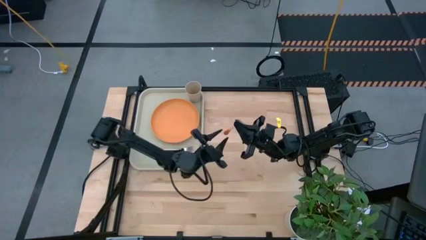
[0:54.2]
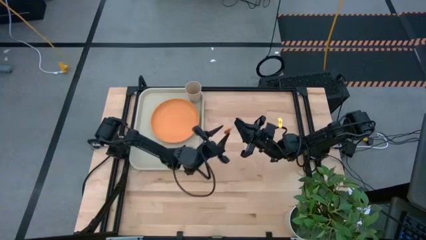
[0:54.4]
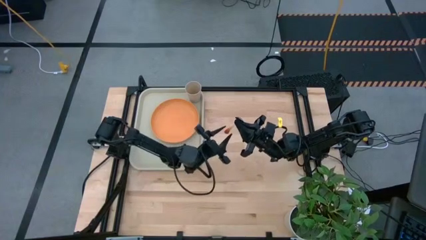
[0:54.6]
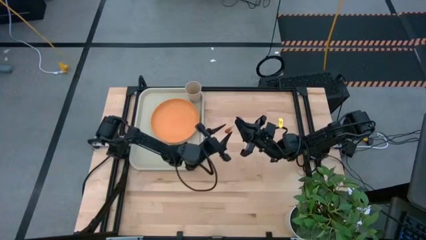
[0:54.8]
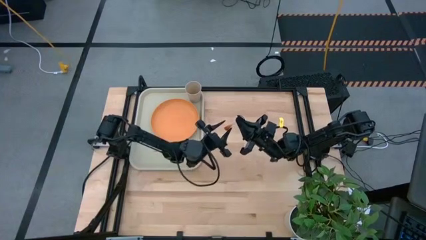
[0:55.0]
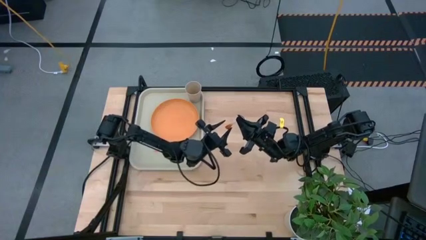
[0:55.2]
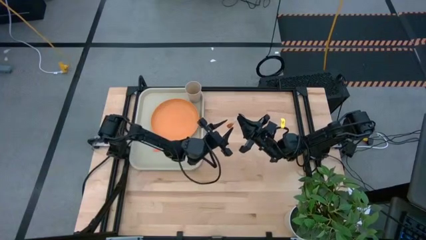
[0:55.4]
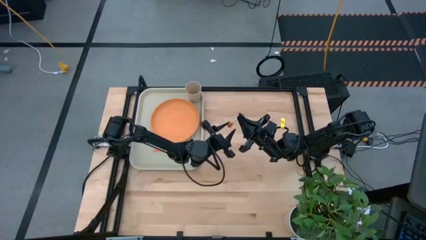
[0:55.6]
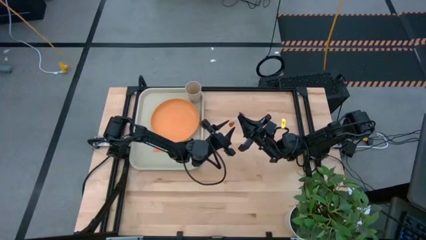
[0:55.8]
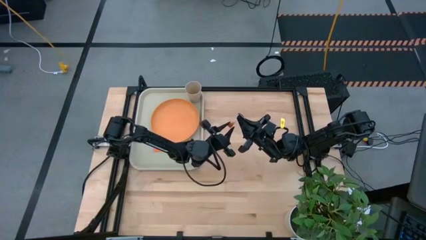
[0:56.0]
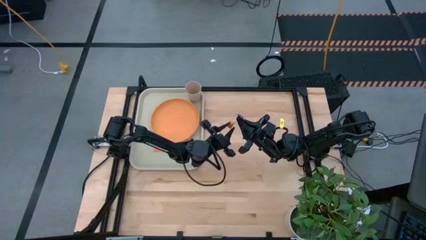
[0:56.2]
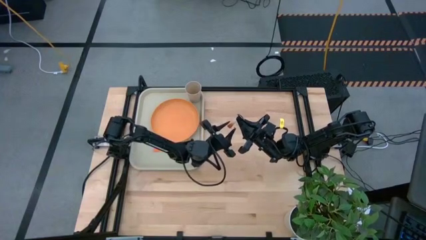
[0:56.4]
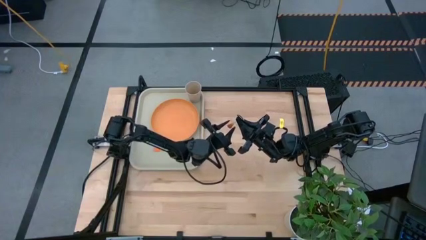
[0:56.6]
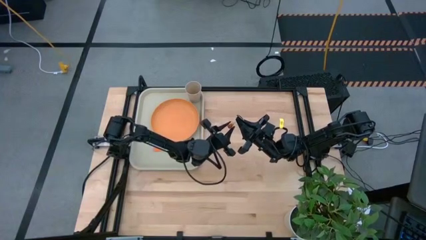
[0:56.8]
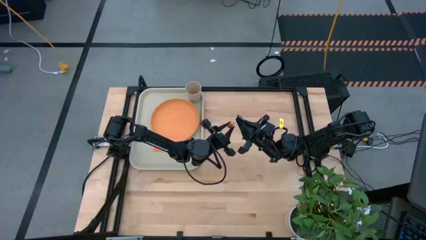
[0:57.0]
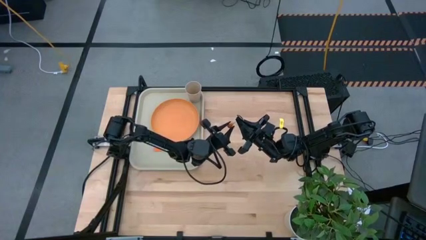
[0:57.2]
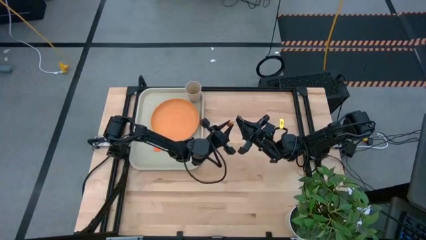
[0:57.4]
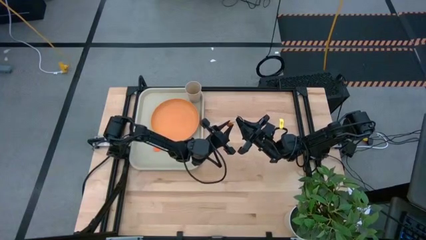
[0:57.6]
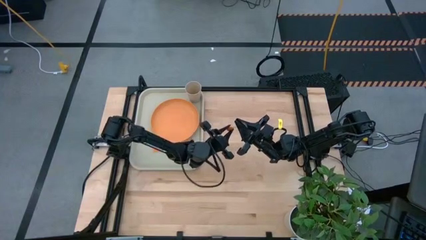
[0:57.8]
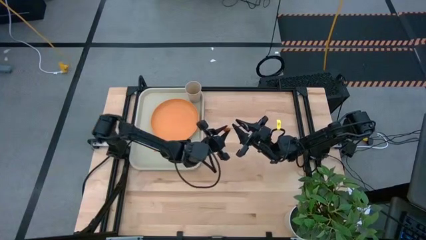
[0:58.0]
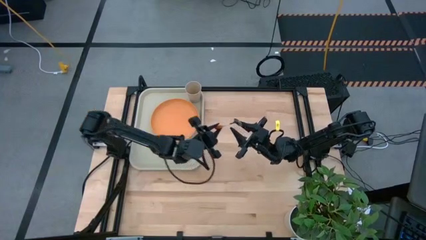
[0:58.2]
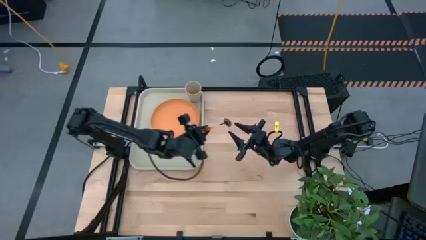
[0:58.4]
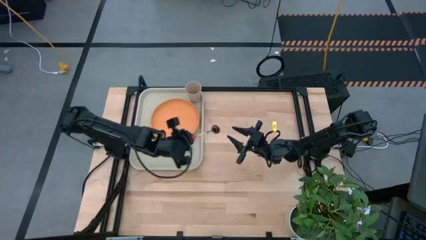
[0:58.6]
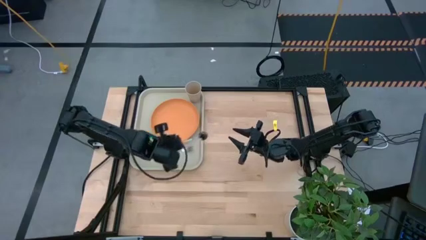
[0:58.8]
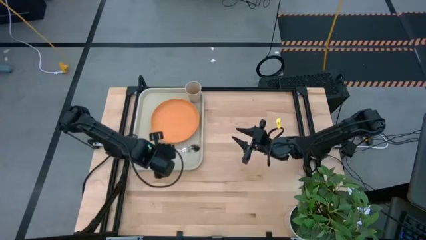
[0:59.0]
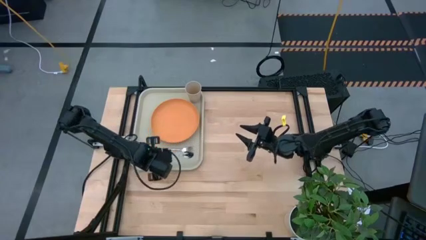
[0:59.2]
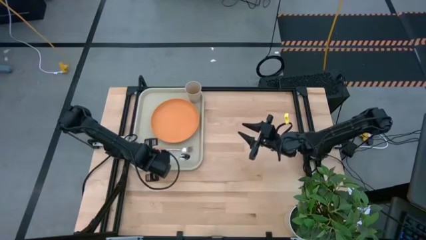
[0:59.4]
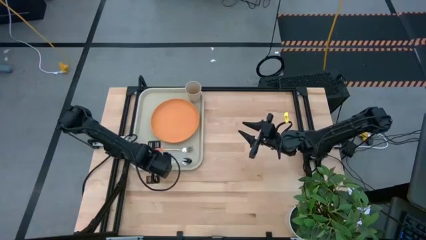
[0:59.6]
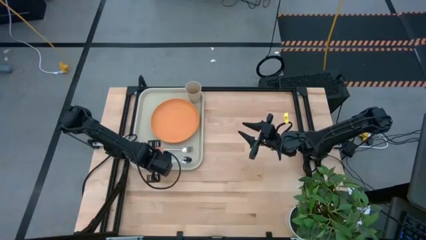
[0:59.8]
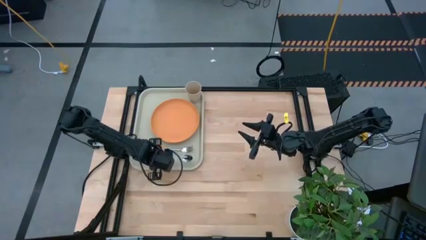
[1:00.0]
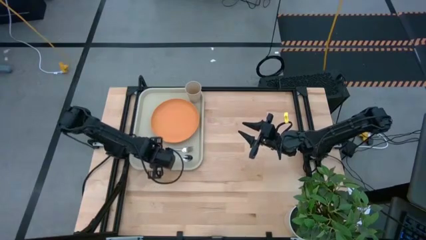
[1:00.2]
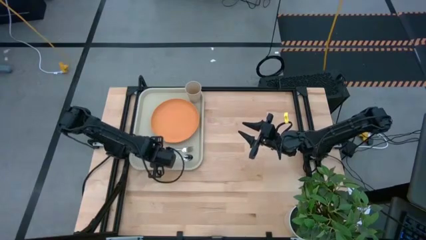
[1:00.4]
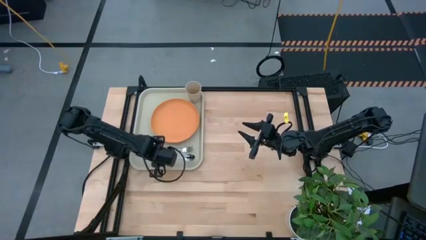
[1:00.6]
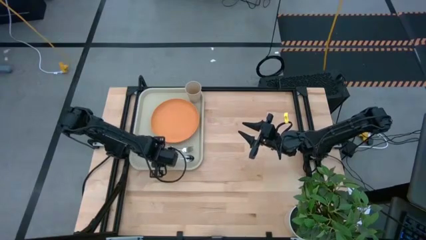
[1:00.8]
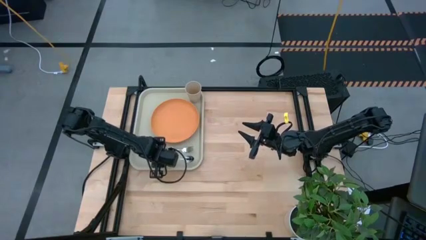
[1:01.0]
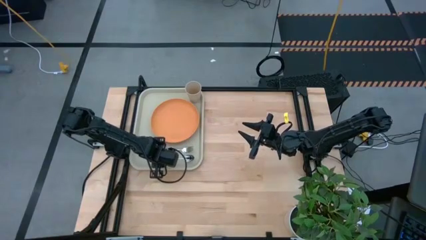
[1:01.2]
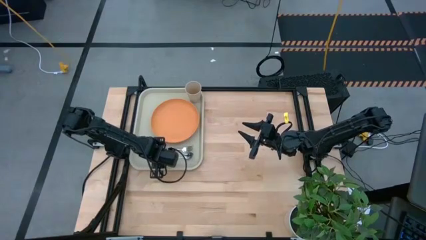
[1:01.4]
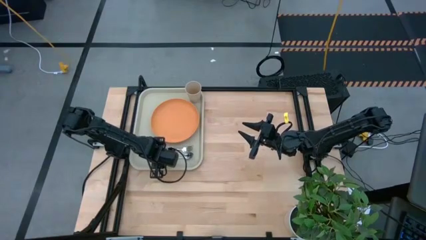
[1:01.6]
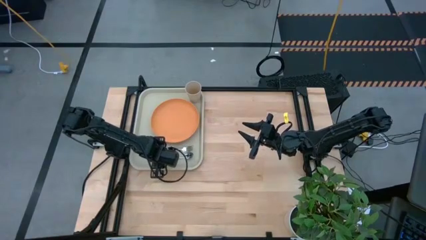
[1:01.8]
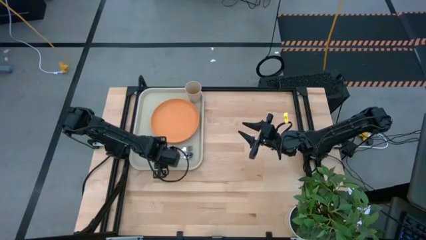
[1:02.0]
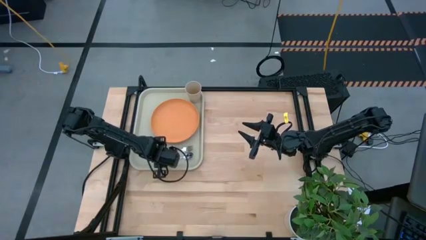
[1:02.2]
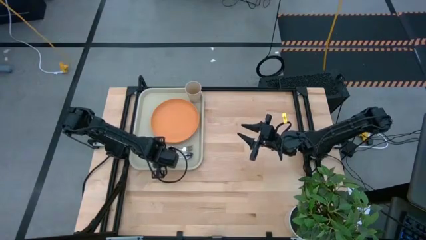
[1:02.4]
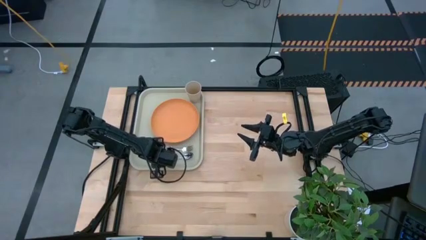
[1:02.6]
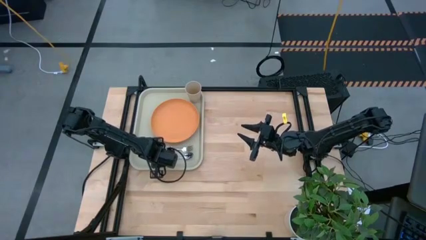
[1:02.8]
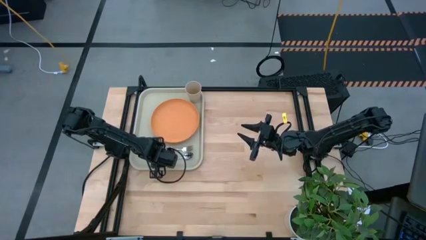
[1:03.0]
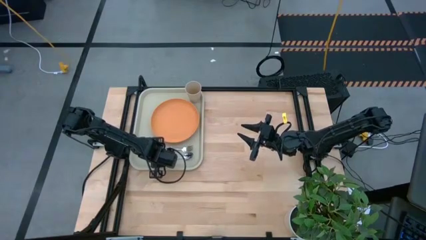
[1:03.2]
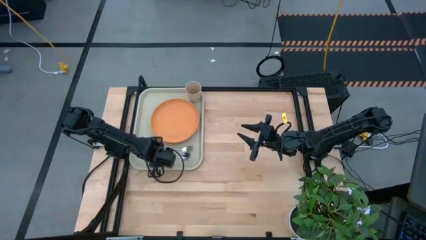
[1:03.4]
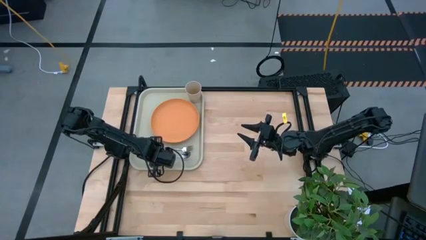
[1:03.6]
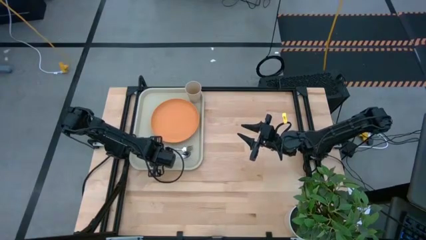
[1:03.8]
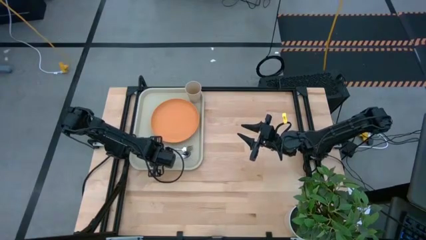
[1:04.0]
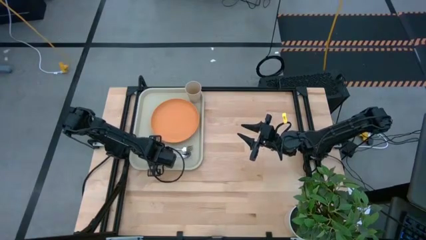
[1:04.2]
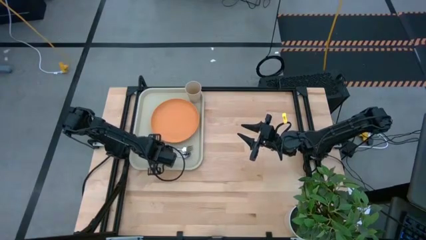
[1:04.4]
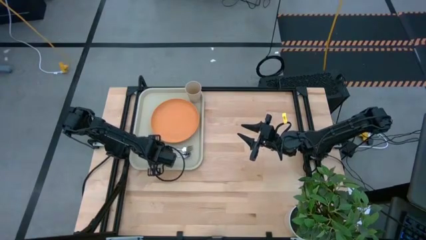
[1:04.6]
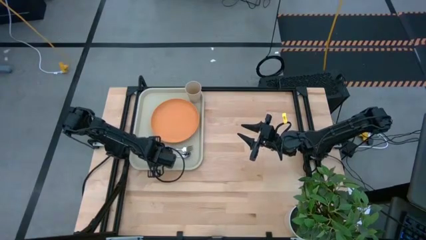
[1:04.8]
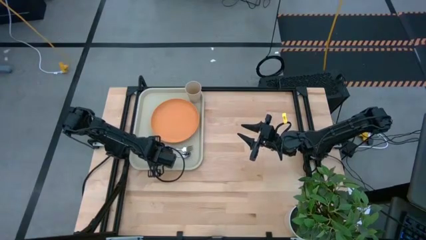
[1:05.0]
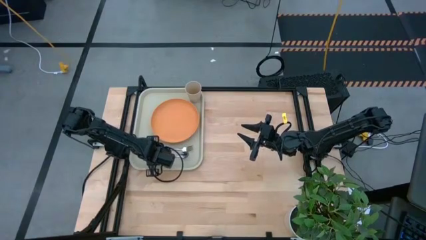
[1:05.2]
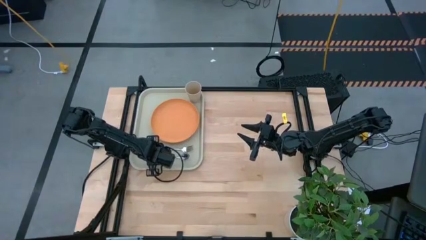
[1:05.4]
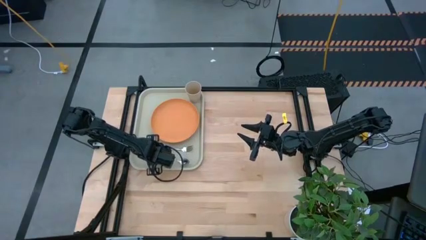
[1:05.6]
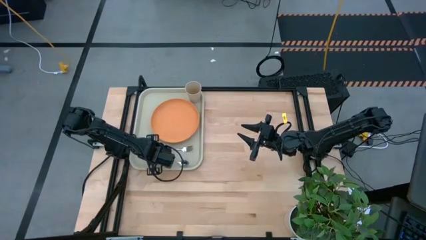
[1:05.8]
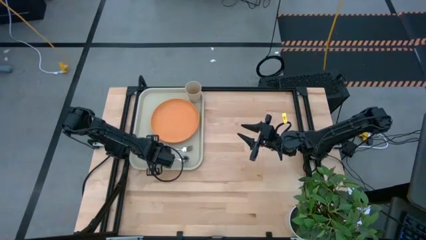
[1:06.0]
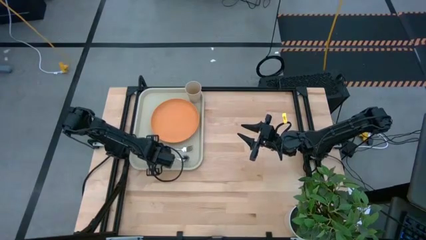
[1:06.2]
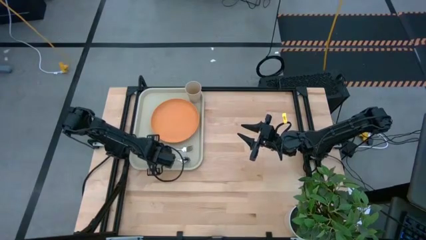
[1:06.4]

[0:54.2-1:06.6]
Task: Pick and place plate/cup/fork/spoon on tray
Put the orange spoon on the light brown tray
